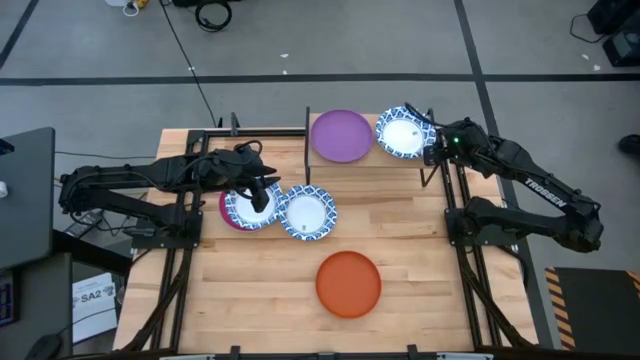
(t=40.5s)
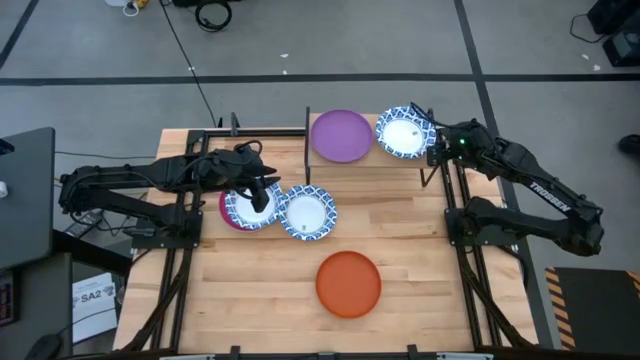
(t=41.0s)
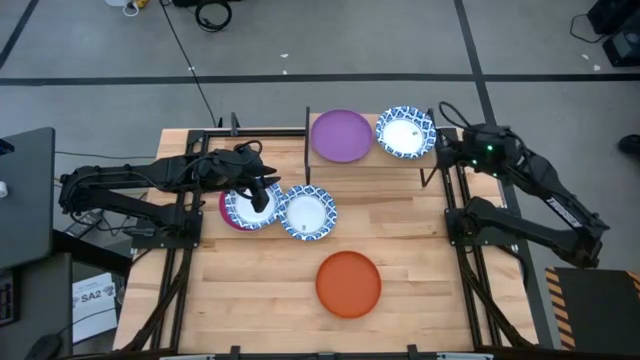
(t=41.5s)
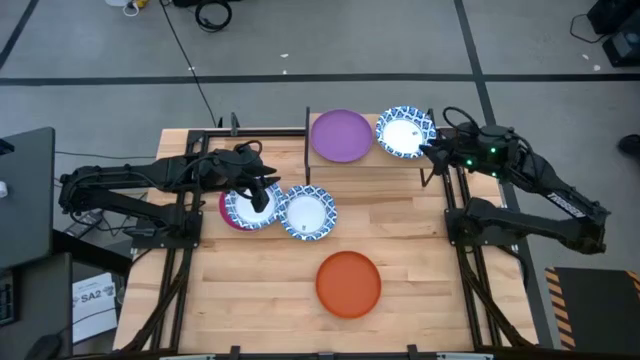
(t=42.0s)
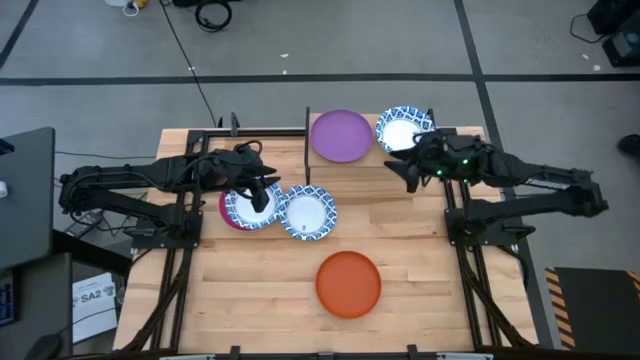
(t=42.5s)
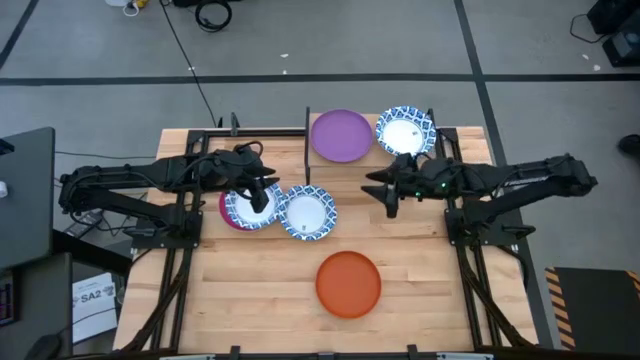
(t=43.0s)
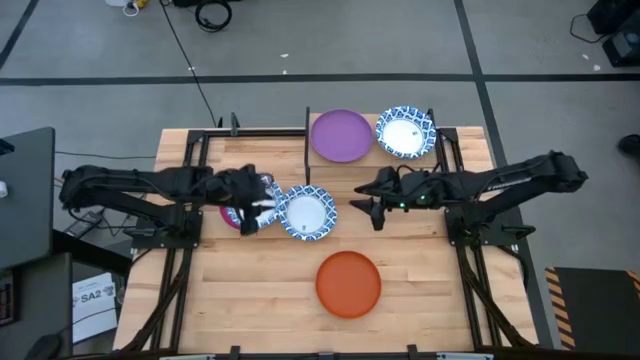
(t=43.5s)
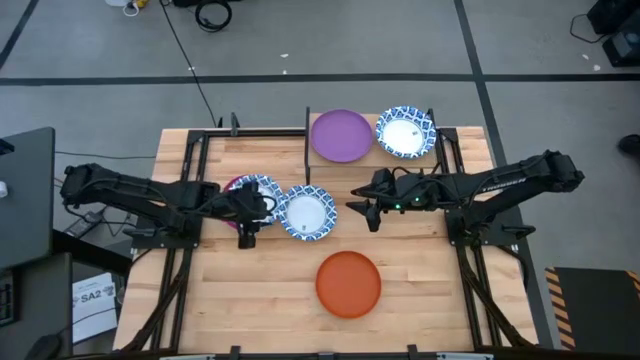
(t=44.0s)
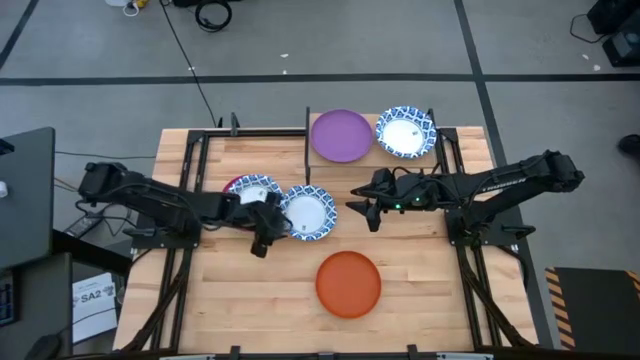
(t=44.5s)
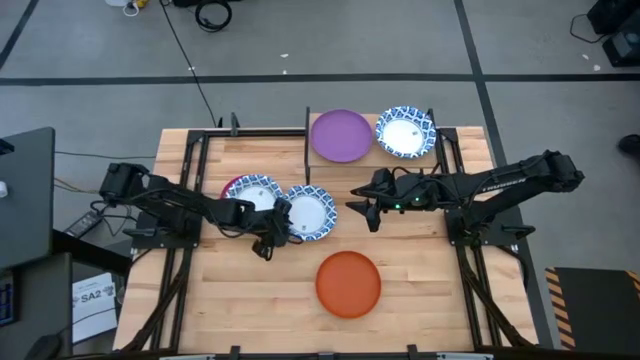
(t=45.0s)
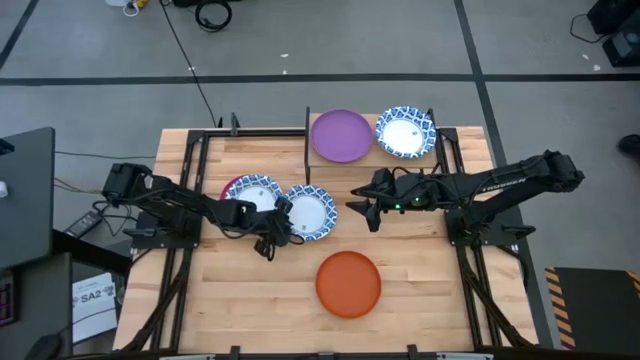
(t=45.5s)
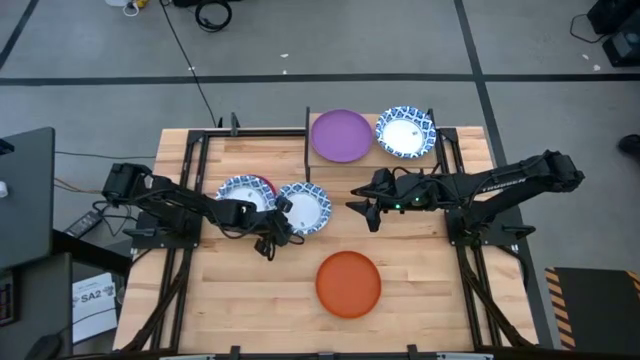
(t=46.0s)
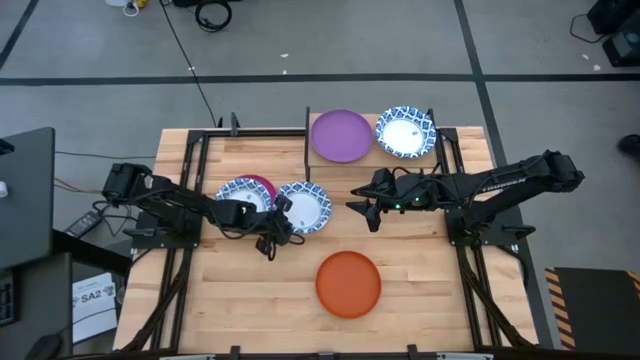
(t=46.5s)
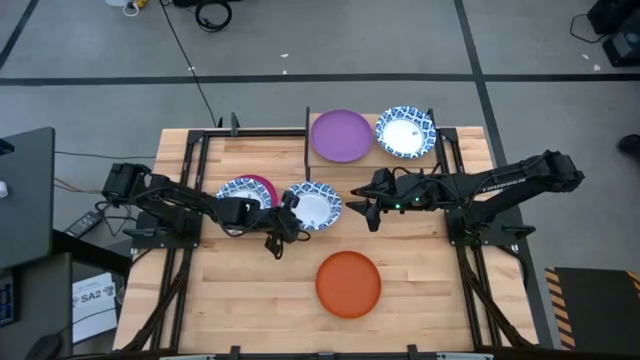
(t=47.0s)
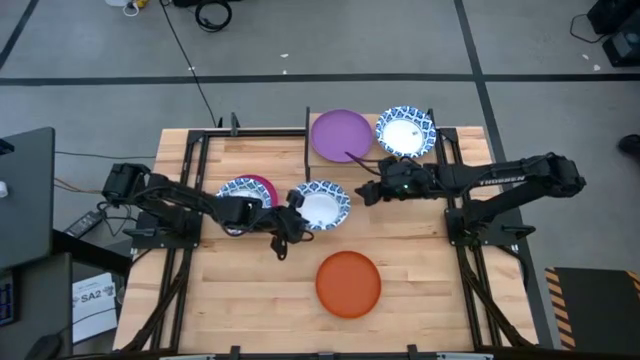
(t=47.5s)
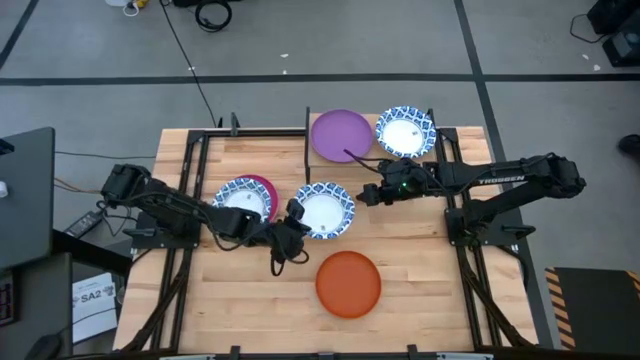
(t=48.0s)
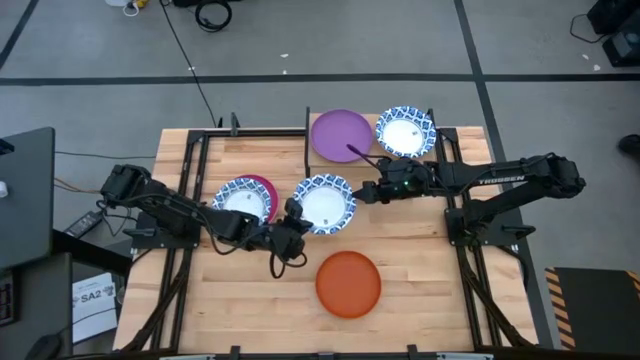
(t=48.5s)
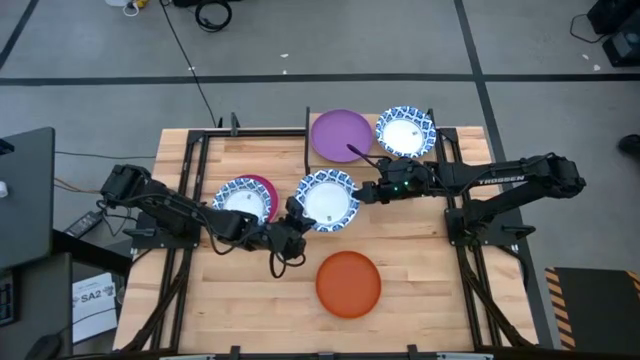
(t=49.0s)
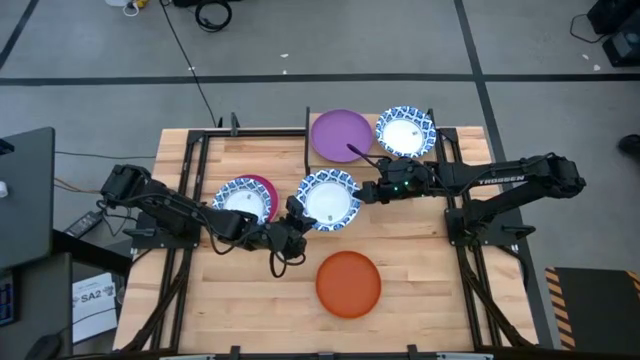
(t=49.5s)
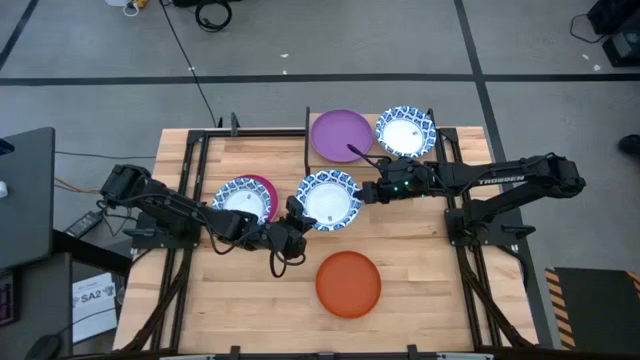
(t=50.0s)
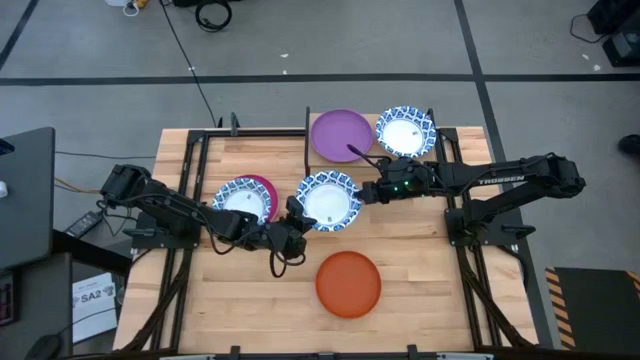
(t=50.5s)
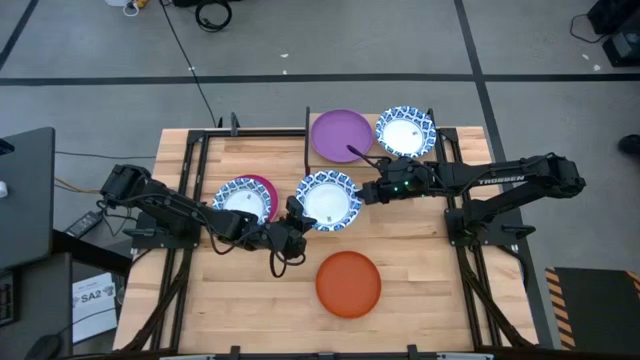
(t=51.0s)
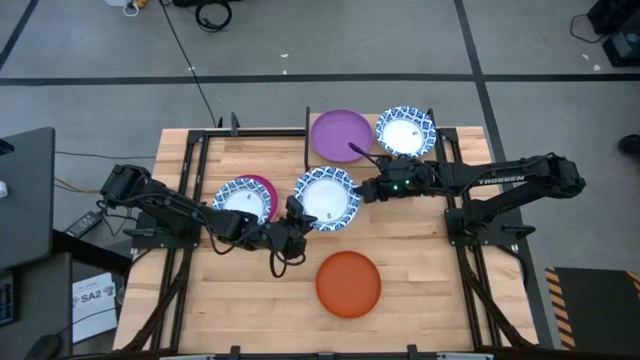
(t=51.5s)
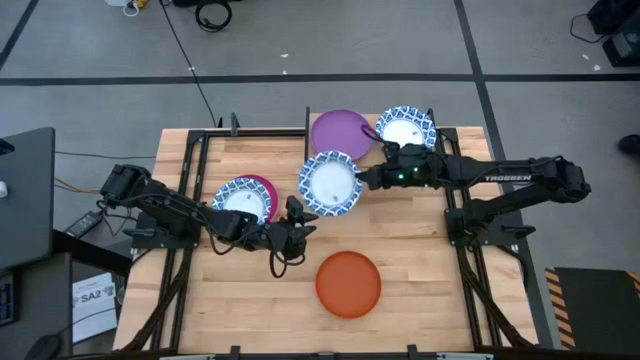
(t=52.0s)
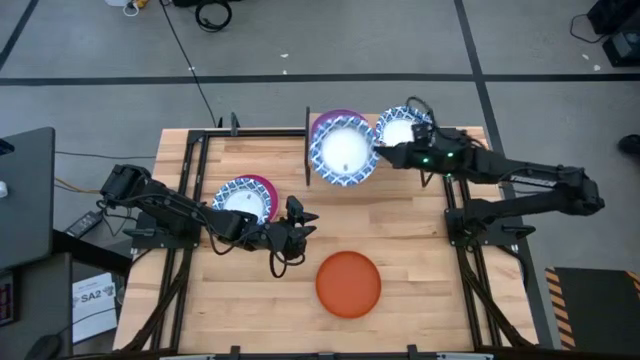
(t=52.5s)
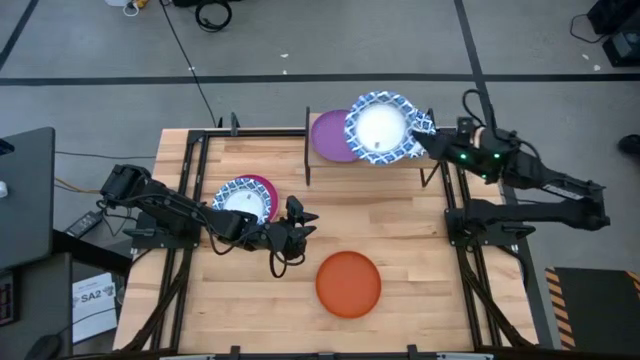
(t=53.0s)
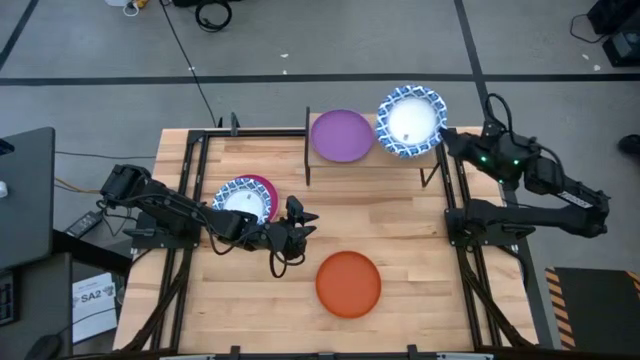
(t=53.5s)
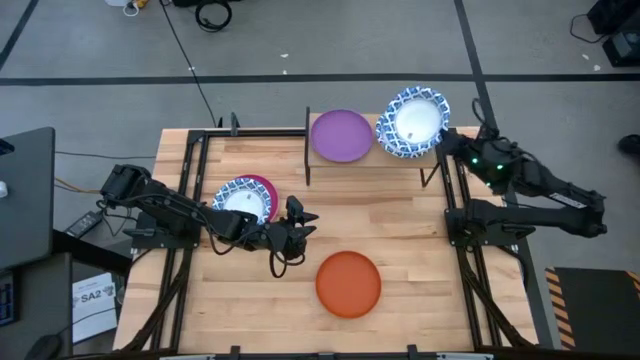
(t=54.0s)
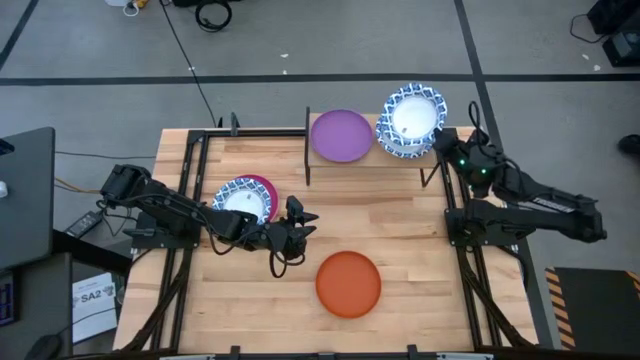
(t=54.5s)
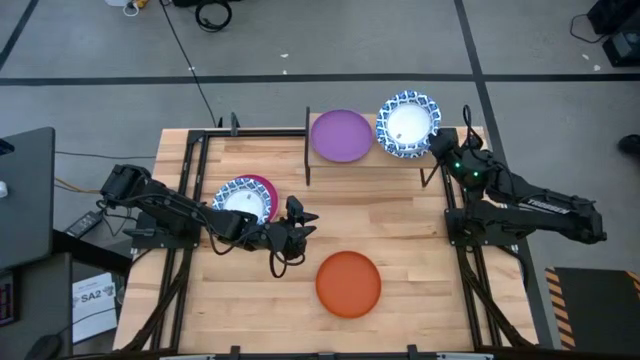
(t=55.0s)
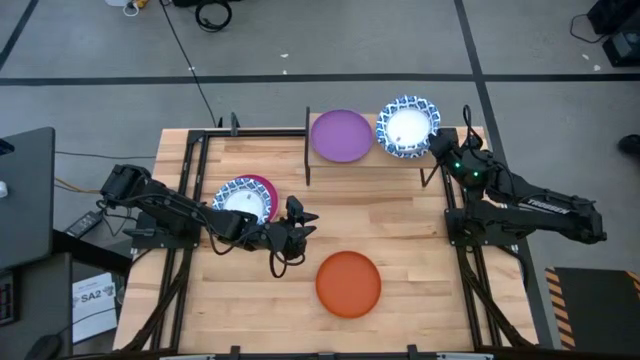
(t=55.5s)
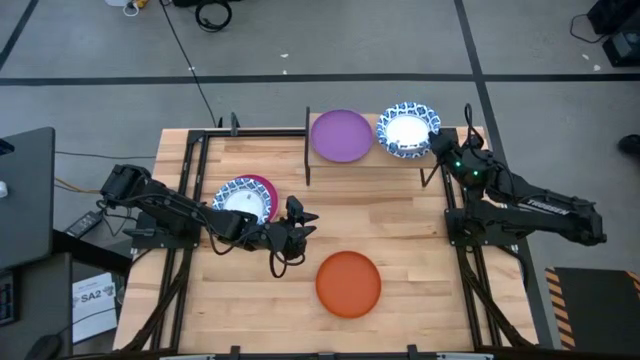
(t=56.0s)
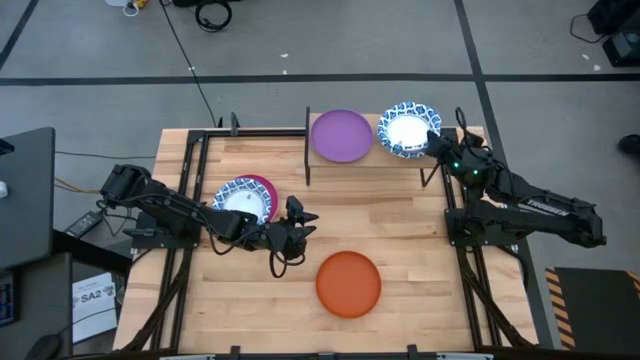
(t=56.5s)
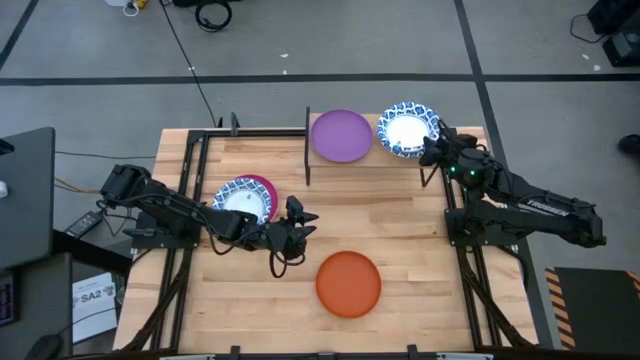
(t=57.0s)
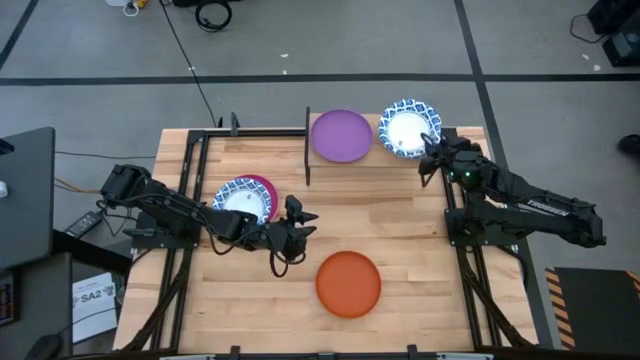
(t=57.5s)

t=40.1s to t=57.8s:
Task: Place and stack plates onto a shelf
Stack the white patterned bowl on top of the white patterned bowl on the shelf

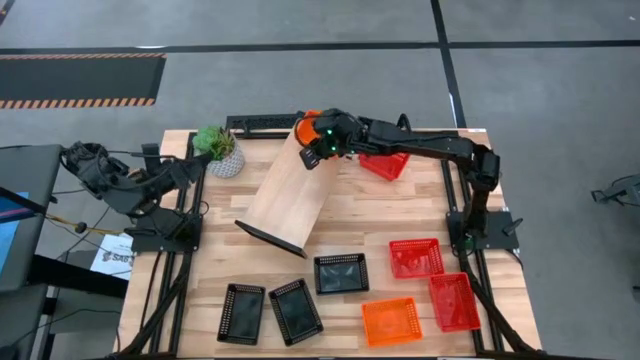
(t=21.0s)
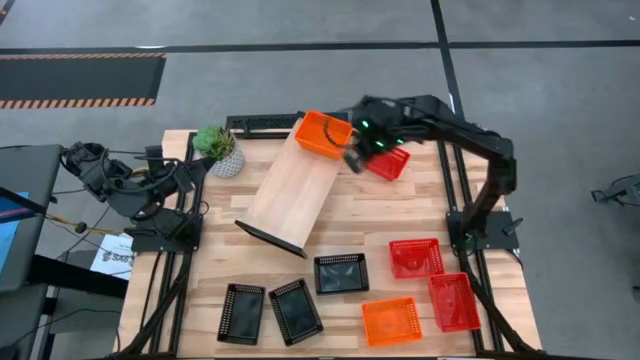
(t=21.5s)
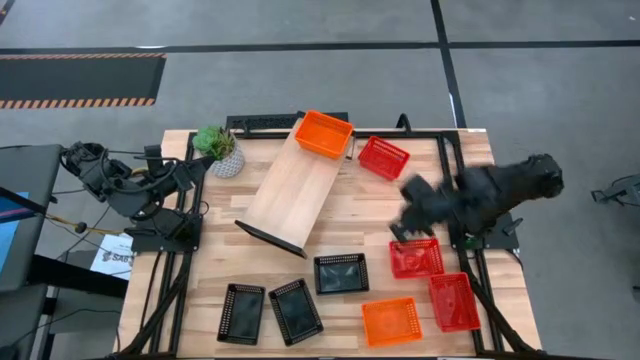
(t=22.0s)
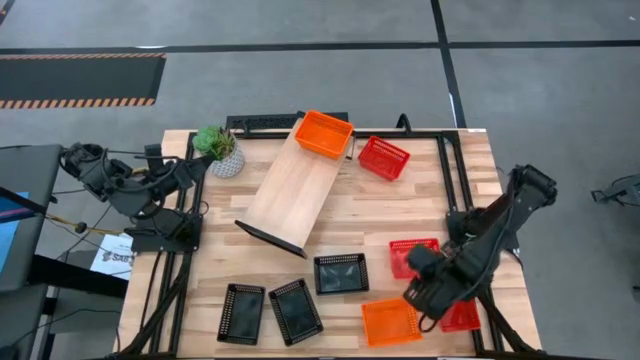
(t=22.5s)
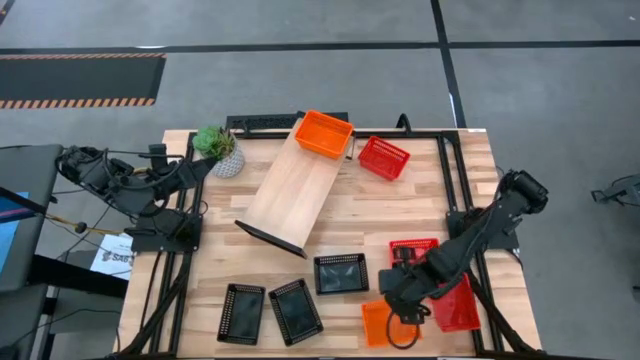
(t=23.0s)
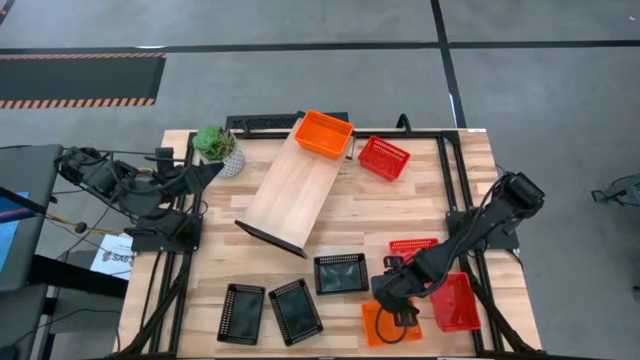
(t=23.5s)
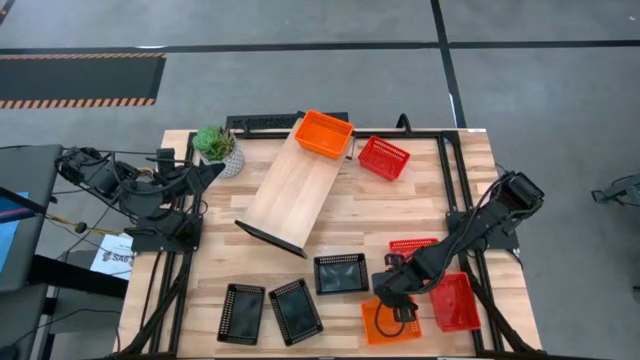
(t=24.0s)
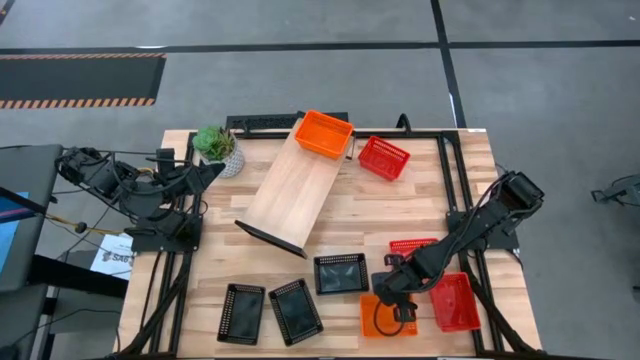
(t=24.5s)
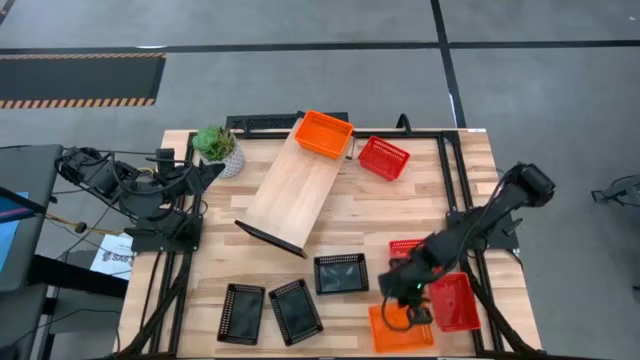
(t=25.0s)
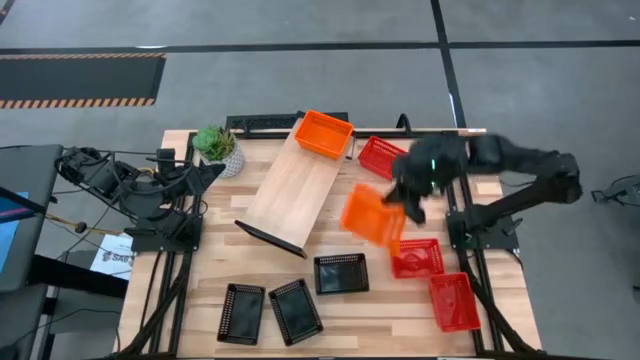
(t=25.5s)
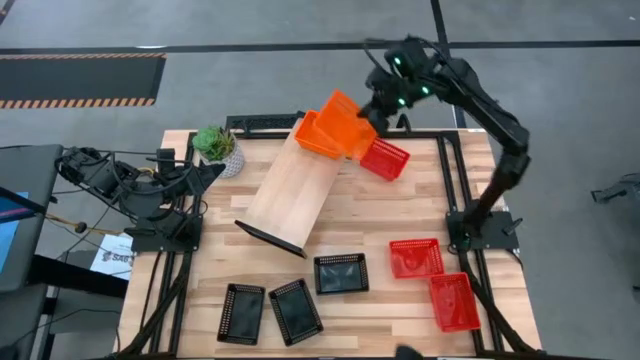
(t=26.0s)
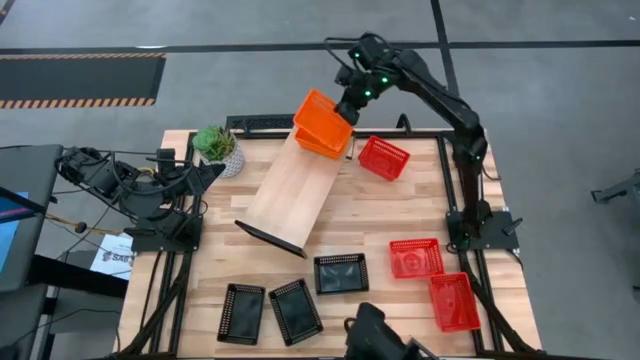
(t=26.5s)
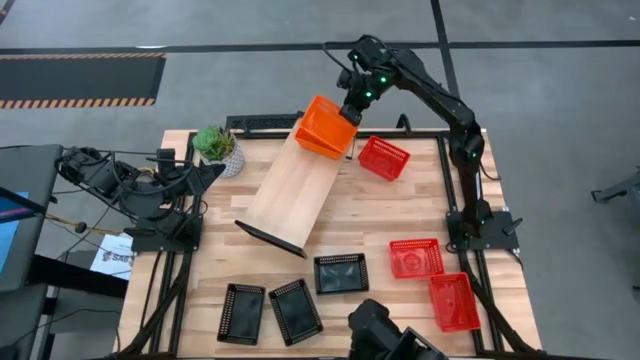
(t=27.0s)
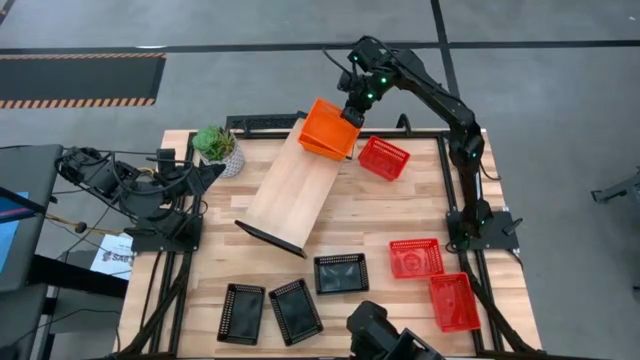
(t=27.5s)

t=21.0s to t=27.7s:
Task: Stack baskets on shelf by color
Stack the orange bin on top of the stacked orange bins on the shelf
